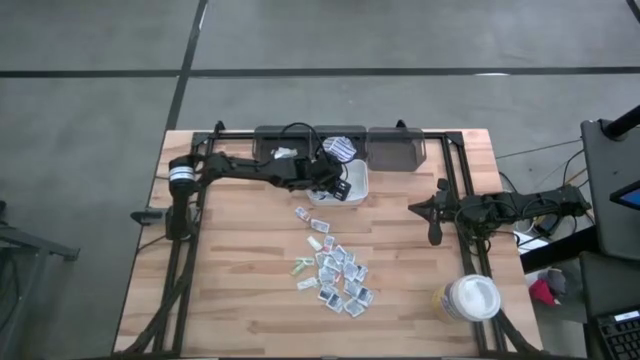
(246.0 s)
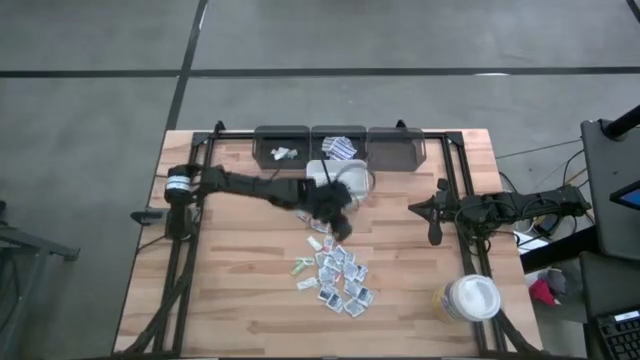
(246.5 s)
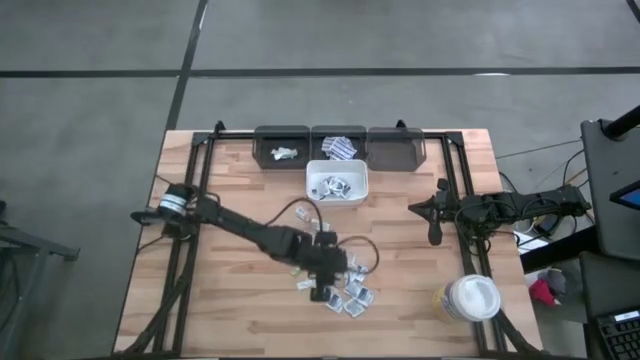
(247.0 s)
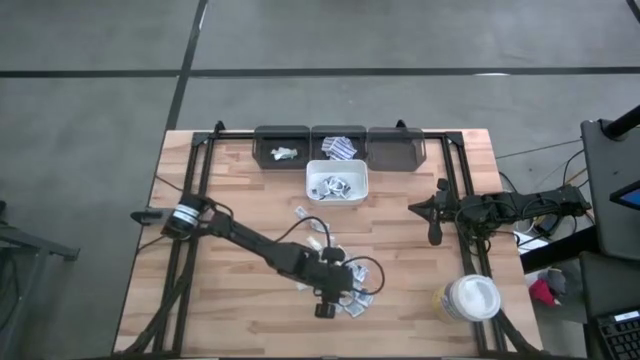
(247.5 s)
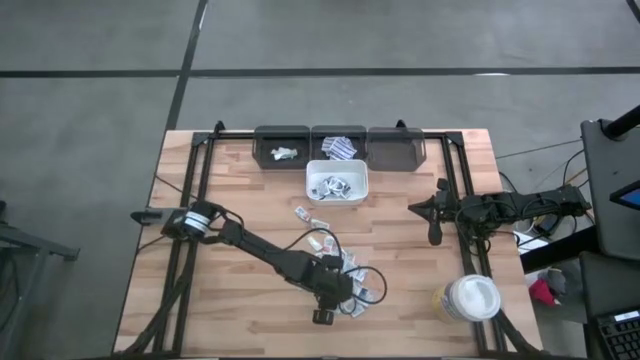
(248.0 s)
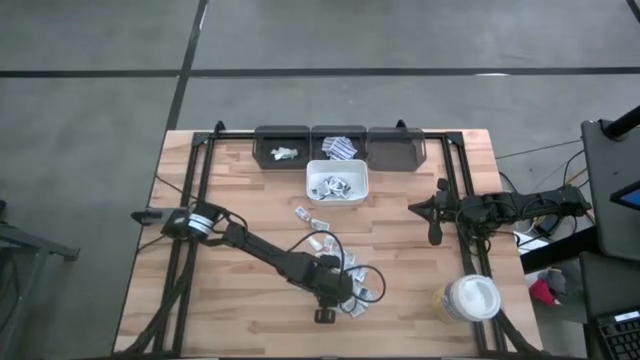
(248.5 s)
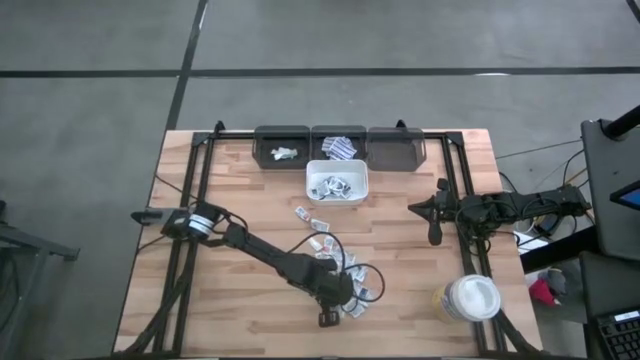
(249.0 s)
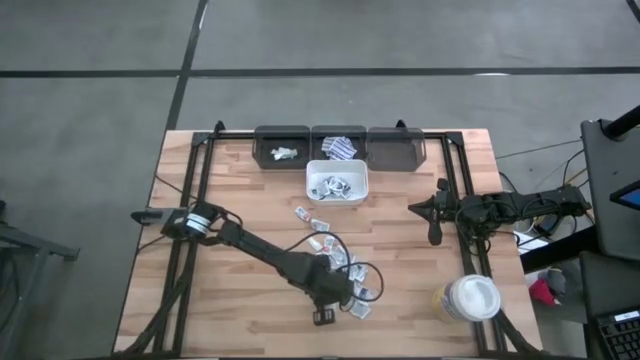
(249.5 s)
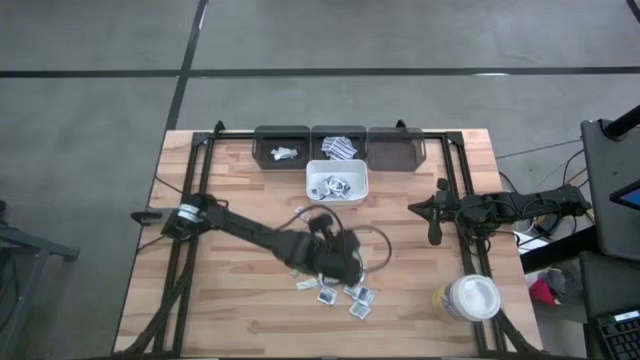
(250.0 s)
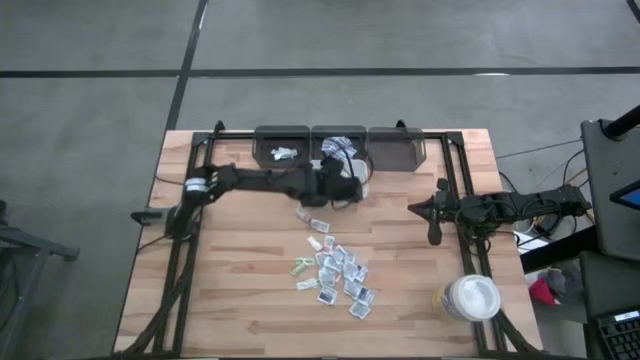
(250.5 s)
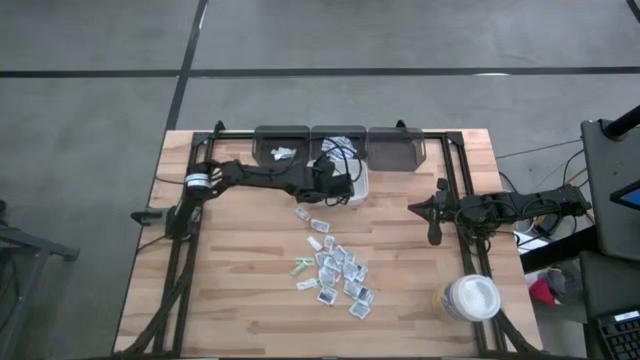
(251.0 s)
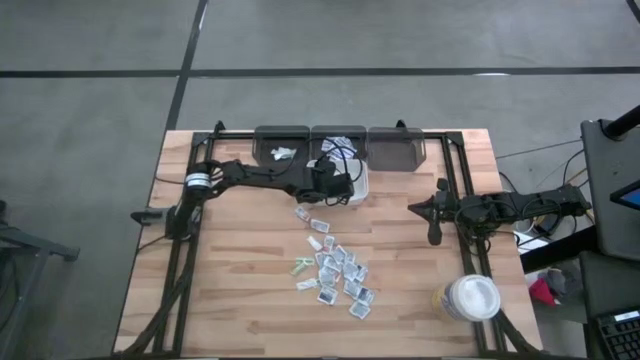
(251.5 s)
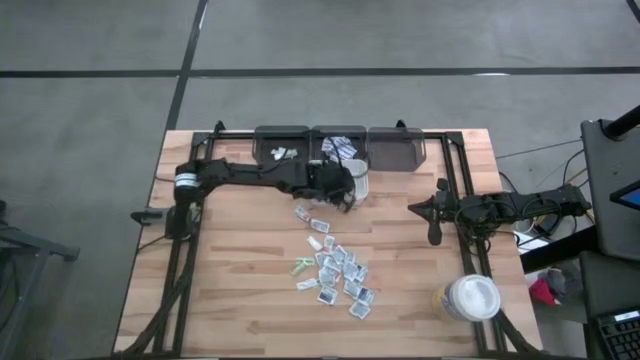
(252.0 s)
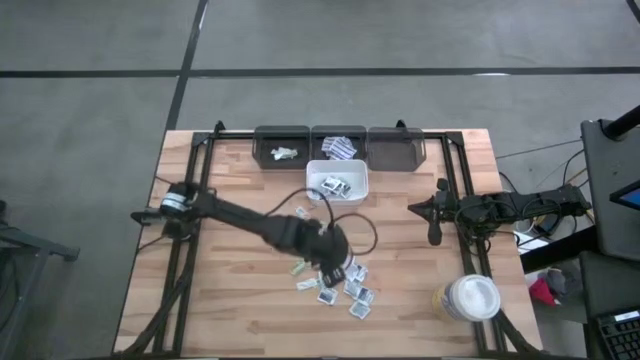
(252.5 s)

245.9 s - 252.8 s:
Task: Pick & Place First Aid Supplies
Put the blue alcohol pad into the white bin

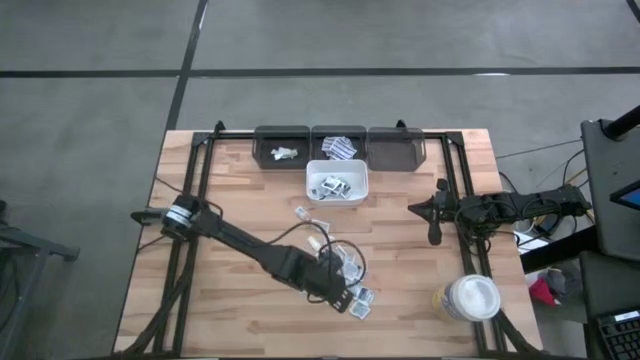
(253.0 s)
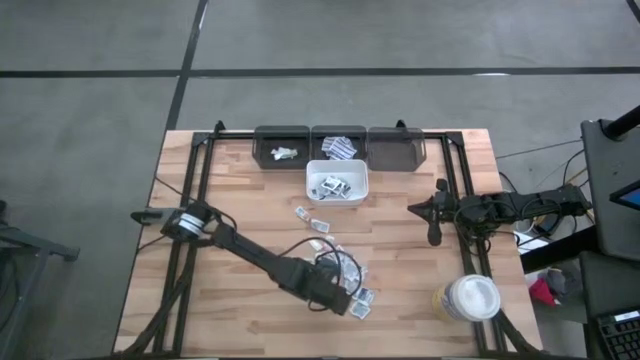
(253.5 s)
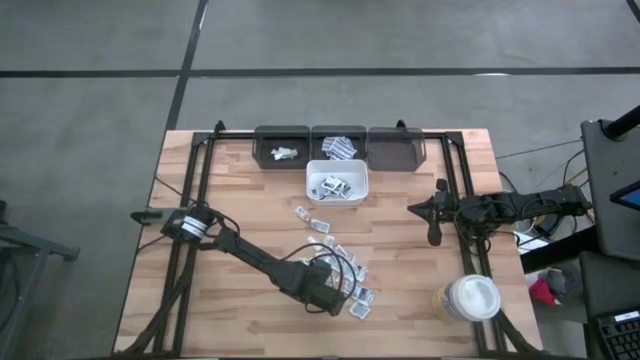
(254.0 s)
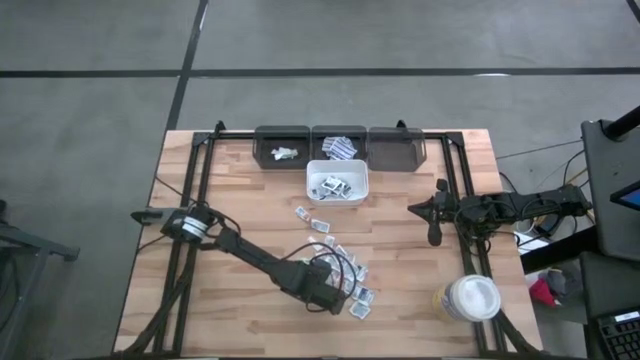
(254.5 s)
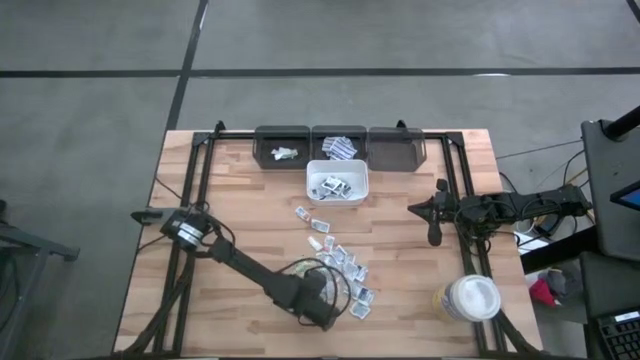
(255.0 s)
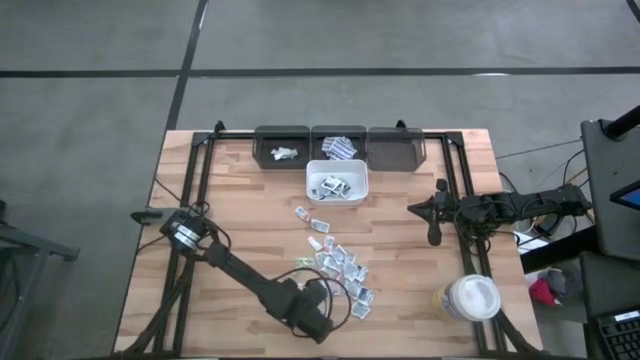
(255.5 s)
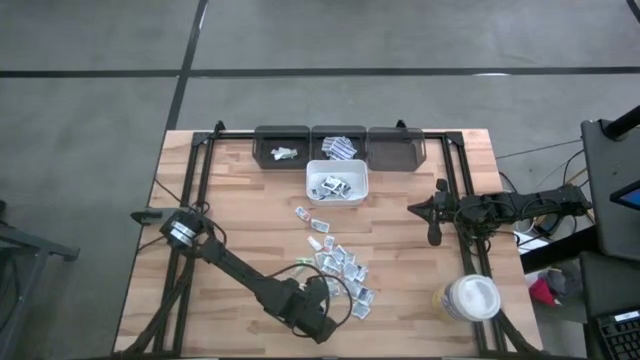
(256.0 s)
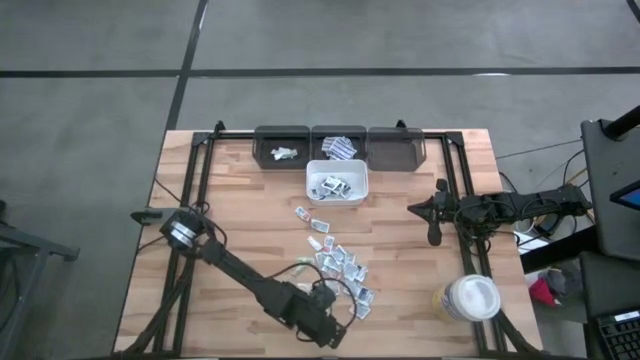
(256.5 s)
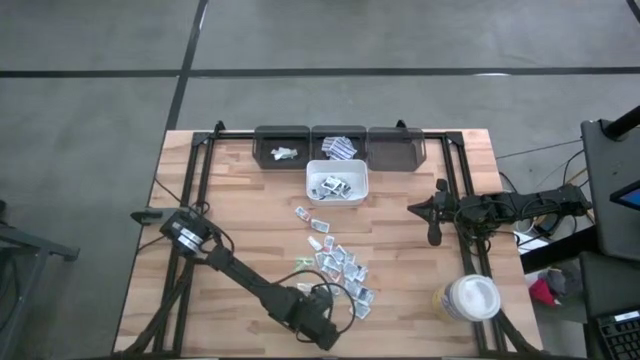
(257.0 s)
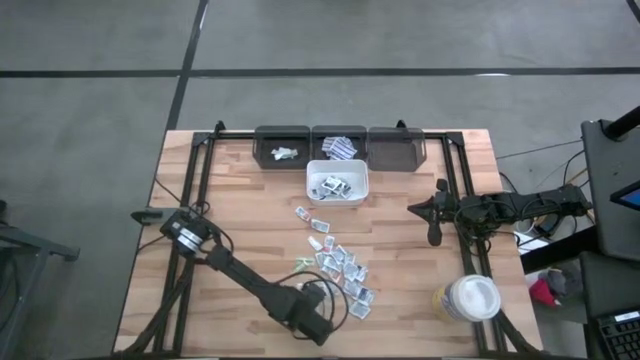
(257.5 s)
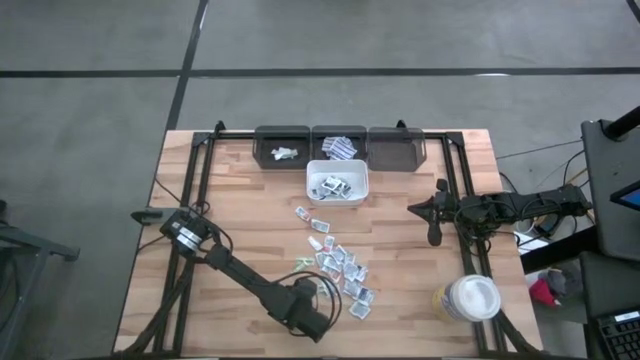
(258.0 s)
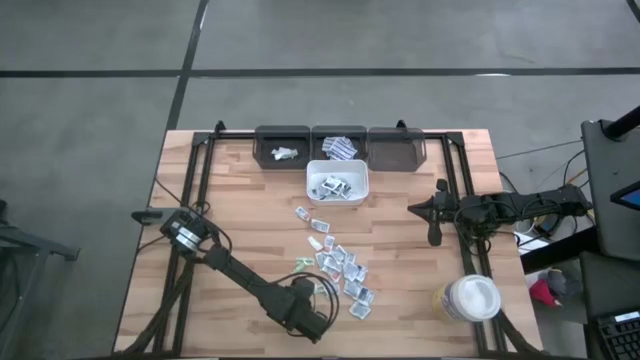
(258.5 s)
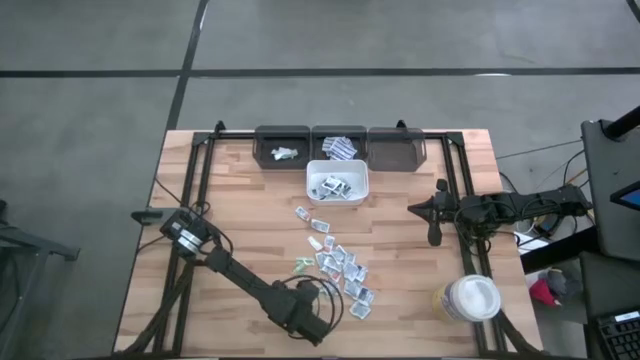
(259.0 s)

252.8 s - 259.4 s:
Put the blue alcohol pad into the white bin

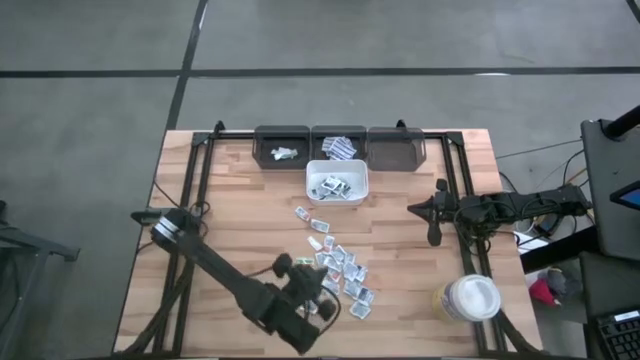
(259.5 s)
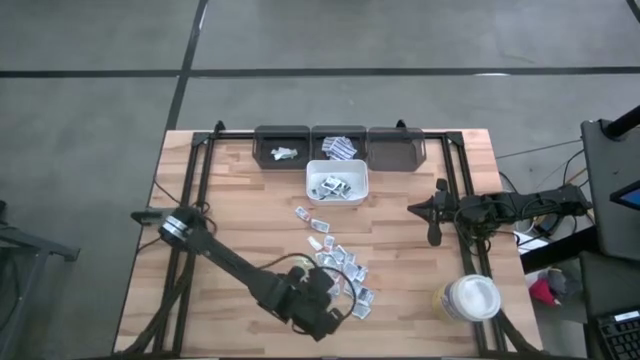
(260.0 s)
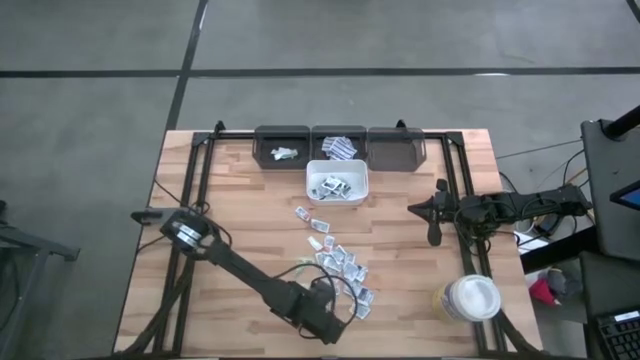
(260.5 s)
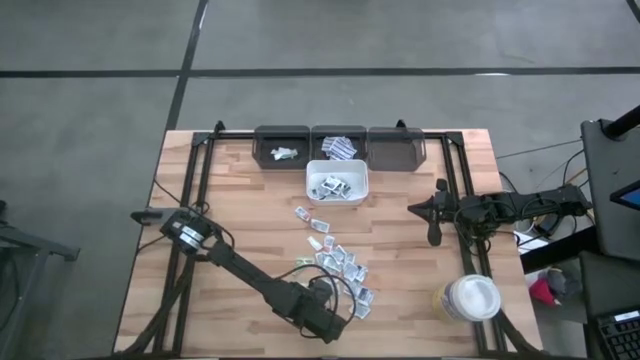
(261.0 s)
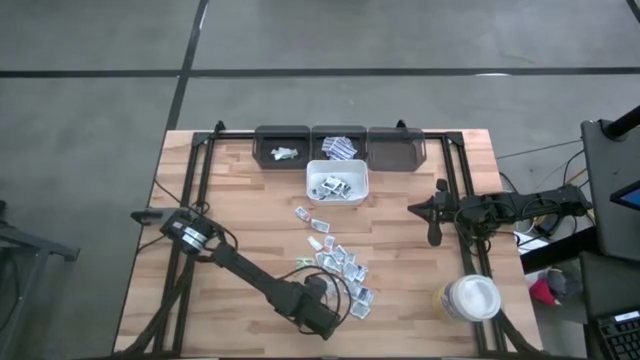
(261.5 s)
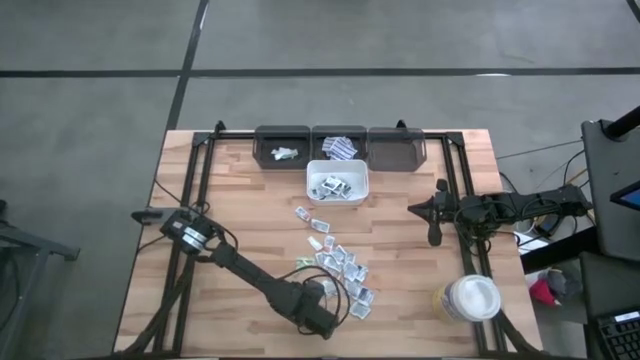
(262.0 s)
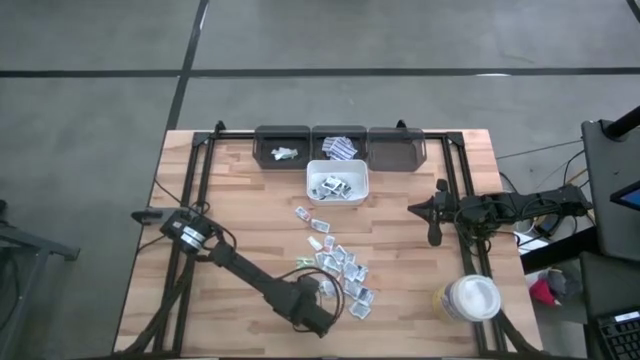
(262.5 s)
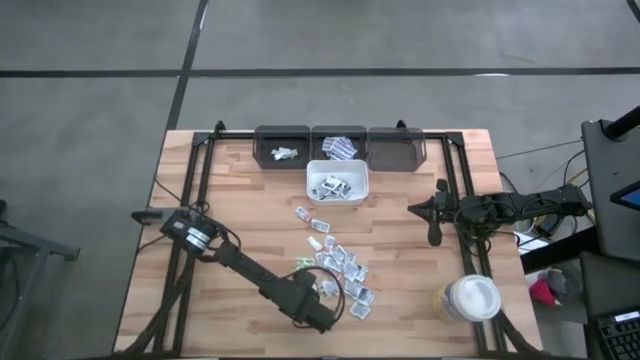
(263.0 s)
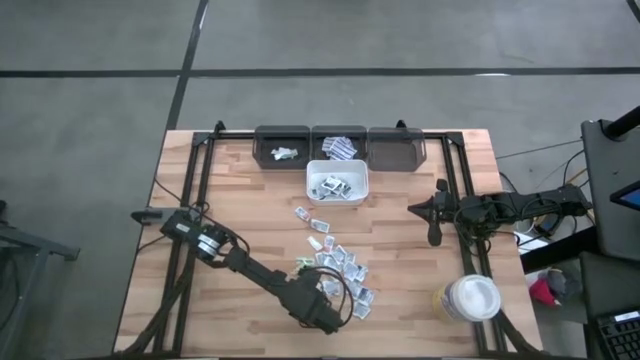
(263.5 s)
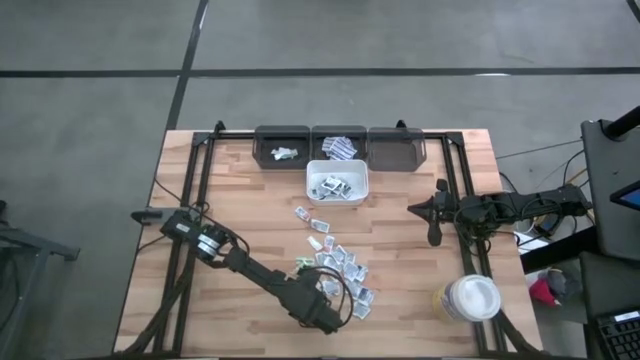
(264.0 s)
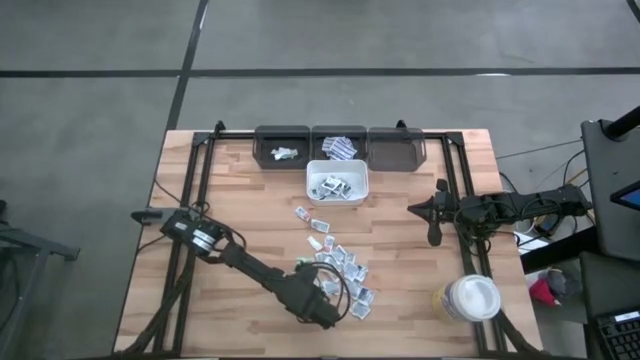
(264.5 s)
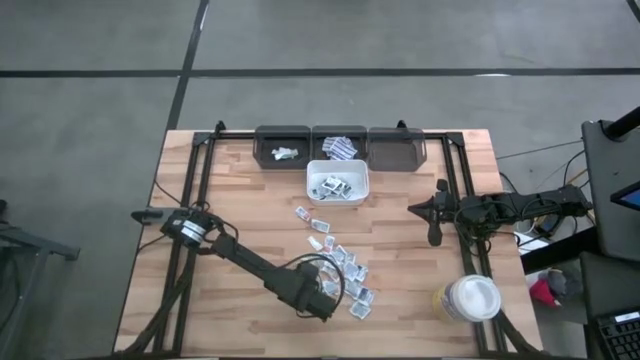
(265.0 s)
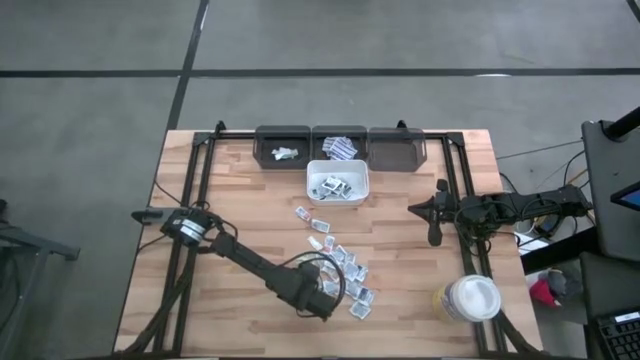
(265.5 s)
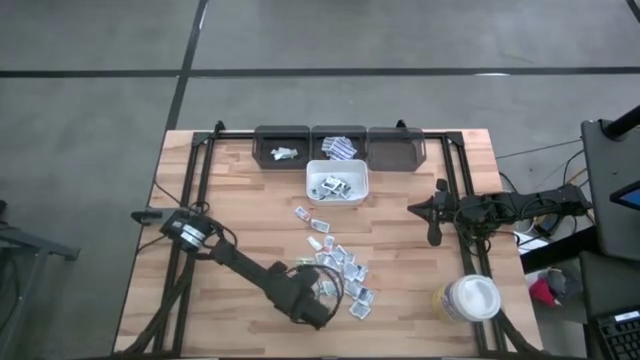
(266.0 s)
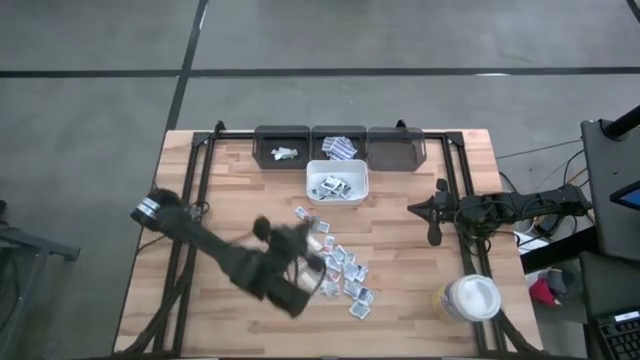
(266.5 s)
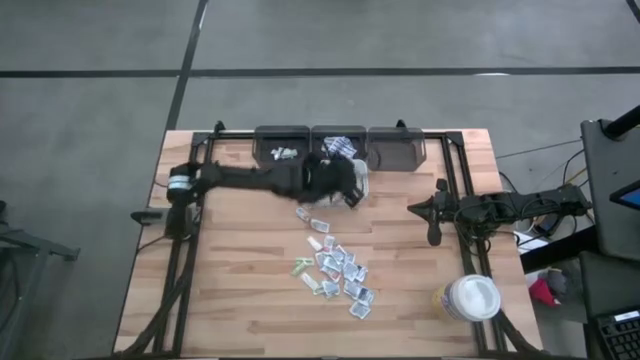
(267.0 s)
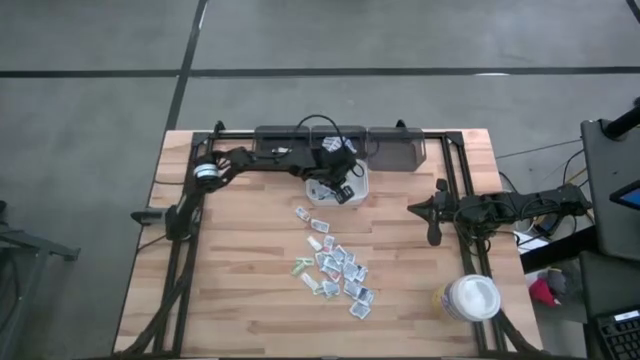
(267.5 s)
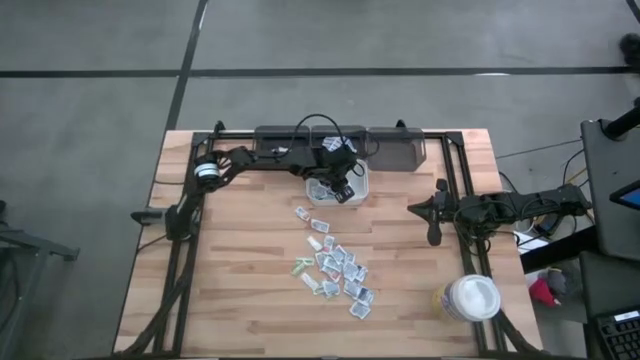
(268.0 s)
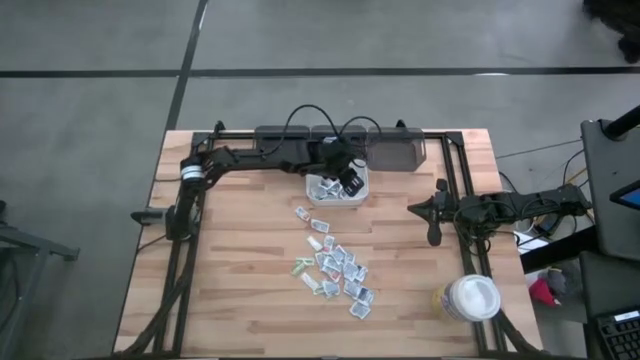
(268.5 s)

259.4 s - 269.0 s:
Put the blue alcohol pad into the white bin
